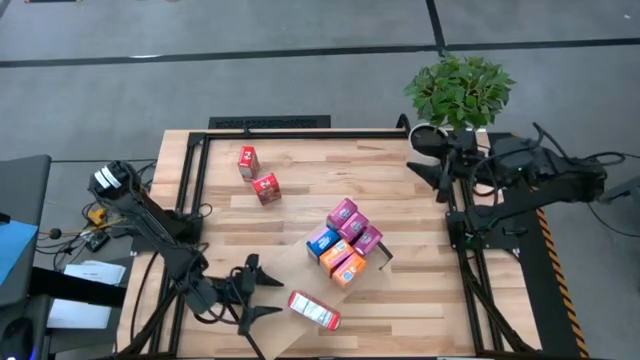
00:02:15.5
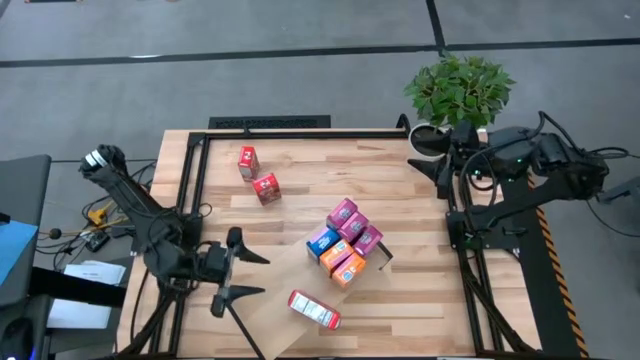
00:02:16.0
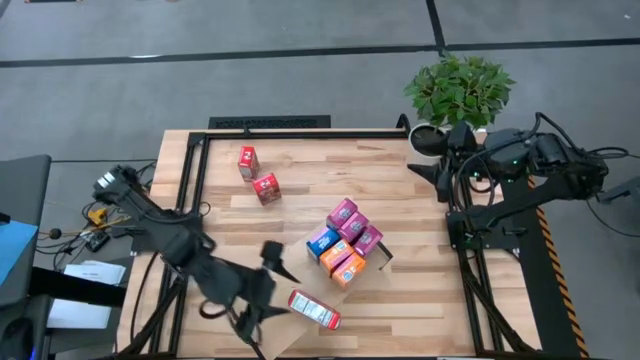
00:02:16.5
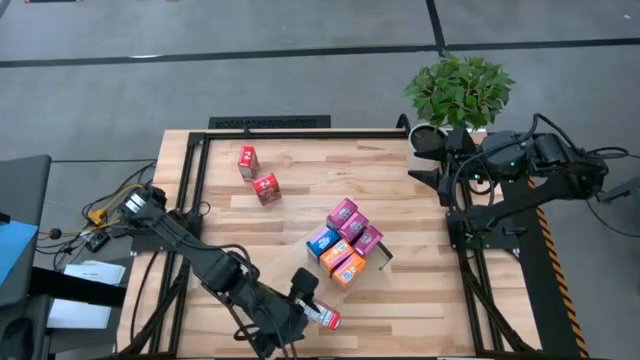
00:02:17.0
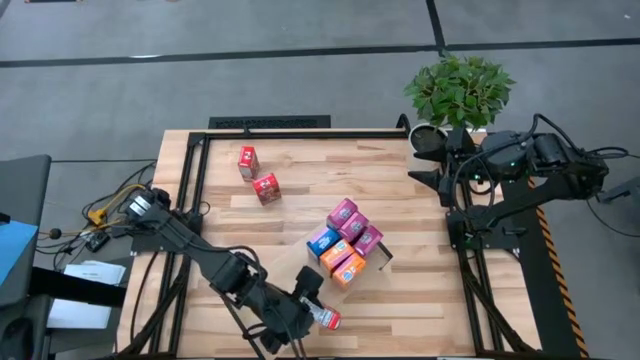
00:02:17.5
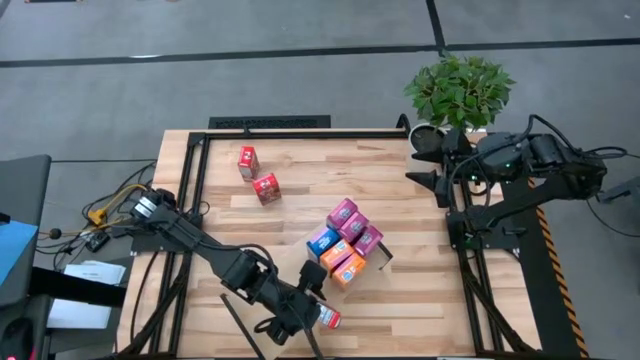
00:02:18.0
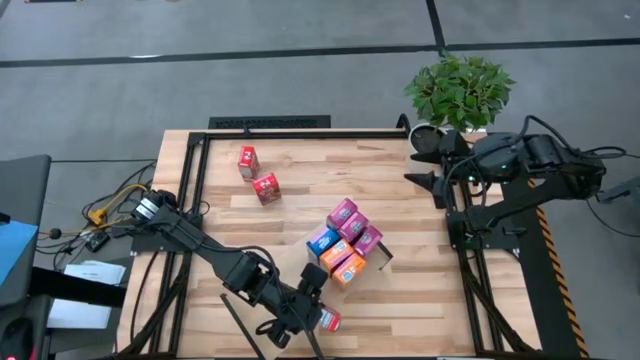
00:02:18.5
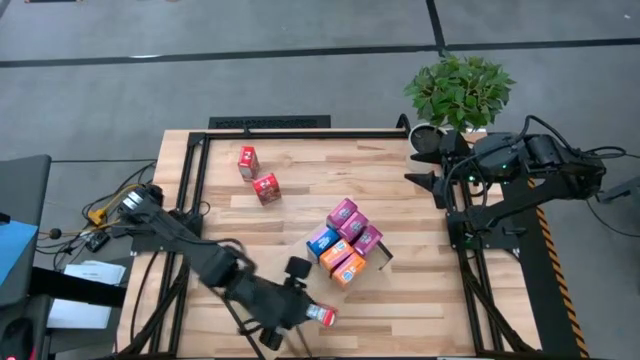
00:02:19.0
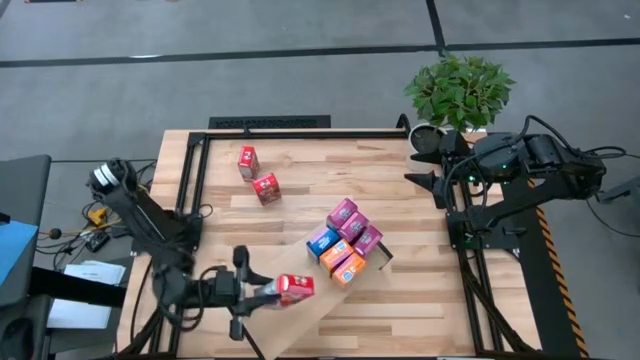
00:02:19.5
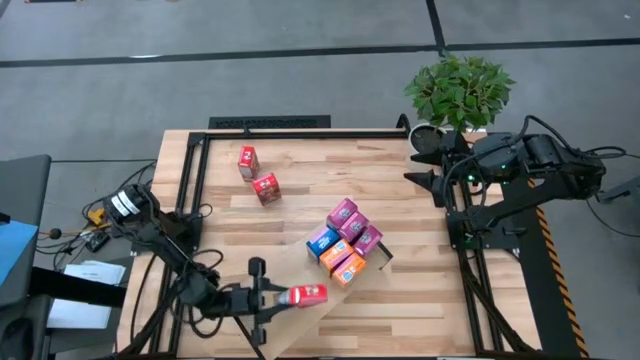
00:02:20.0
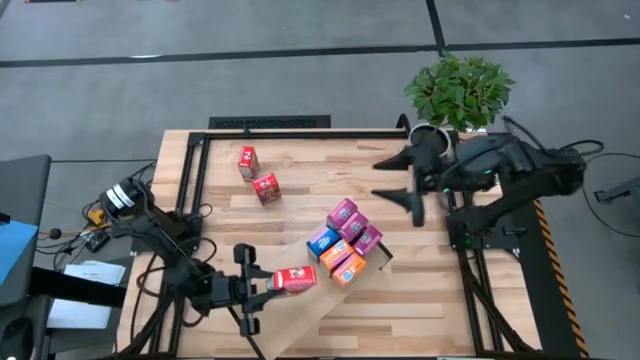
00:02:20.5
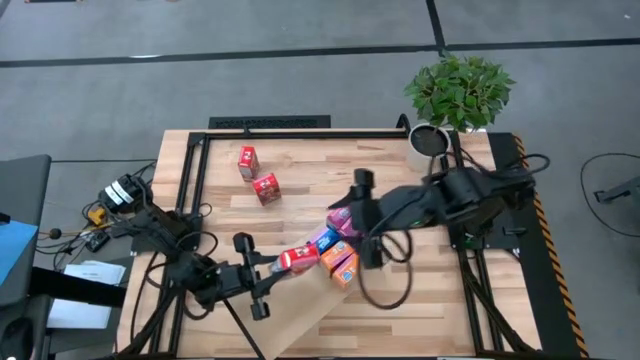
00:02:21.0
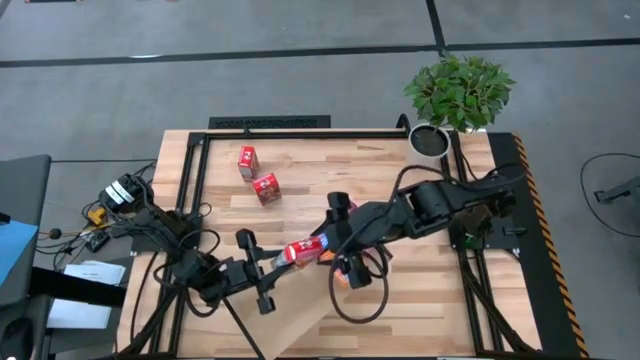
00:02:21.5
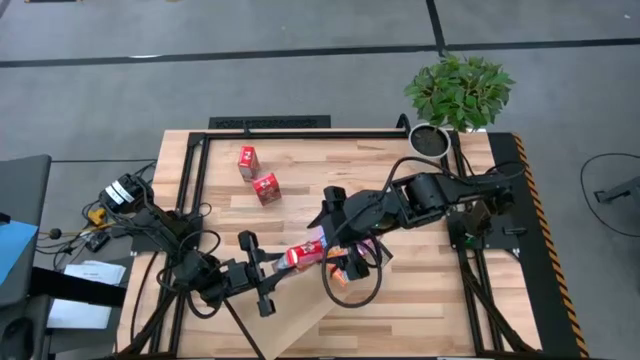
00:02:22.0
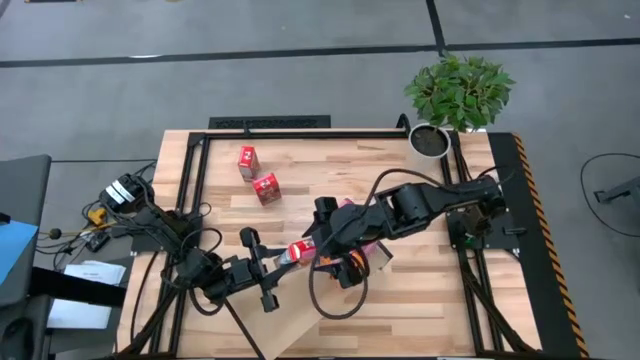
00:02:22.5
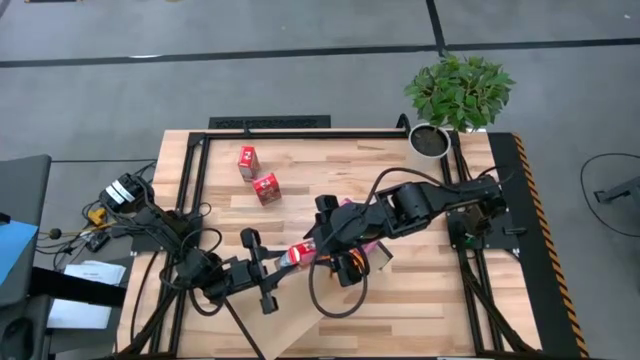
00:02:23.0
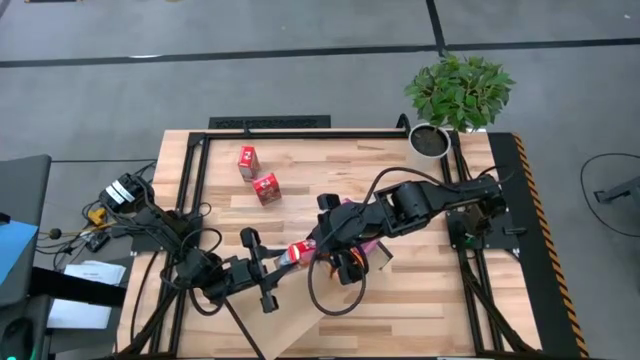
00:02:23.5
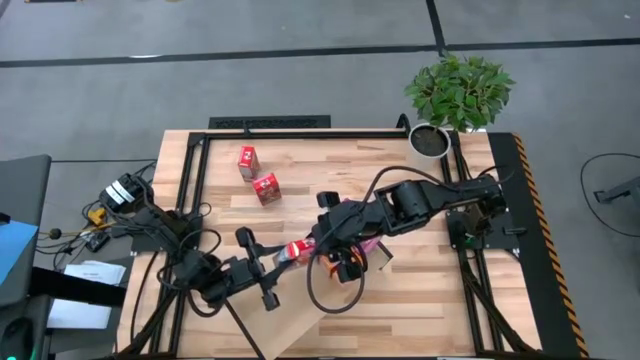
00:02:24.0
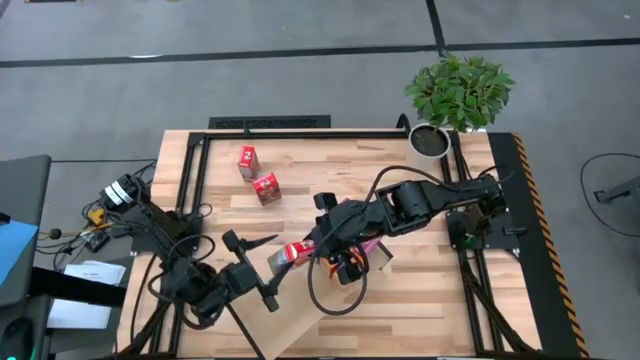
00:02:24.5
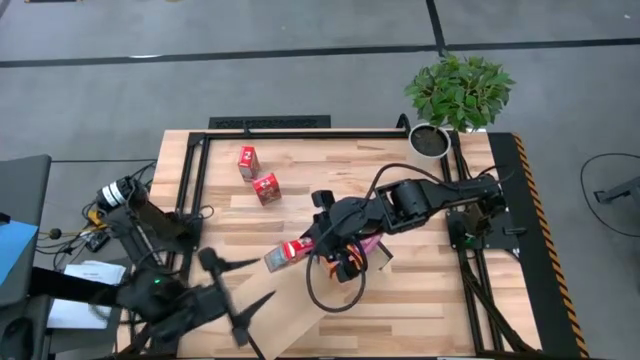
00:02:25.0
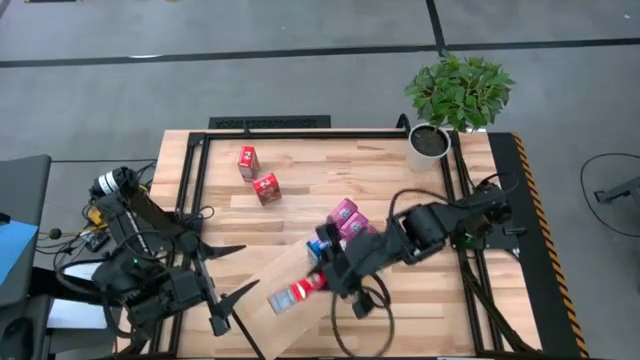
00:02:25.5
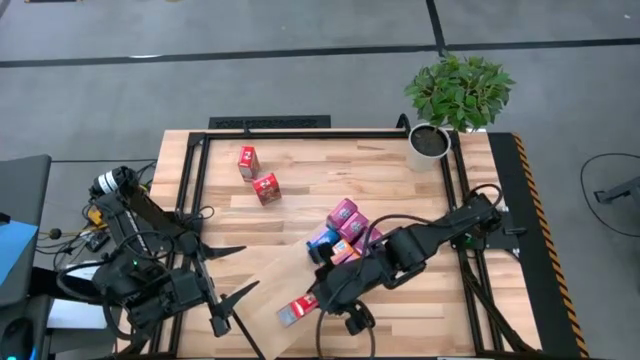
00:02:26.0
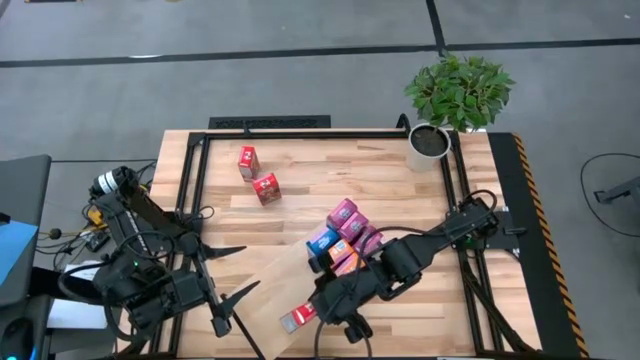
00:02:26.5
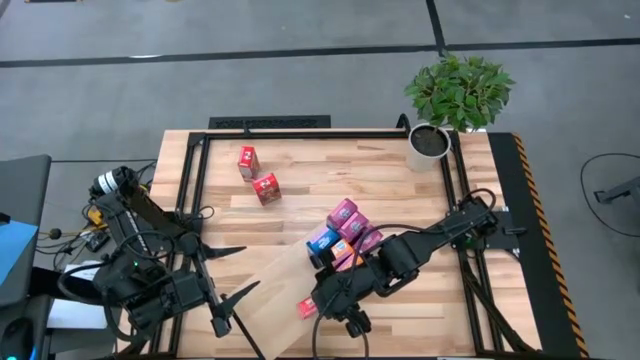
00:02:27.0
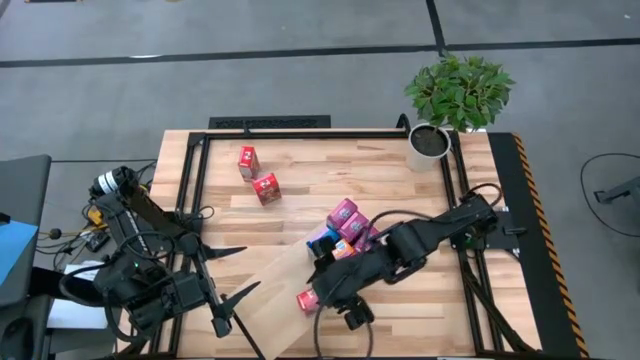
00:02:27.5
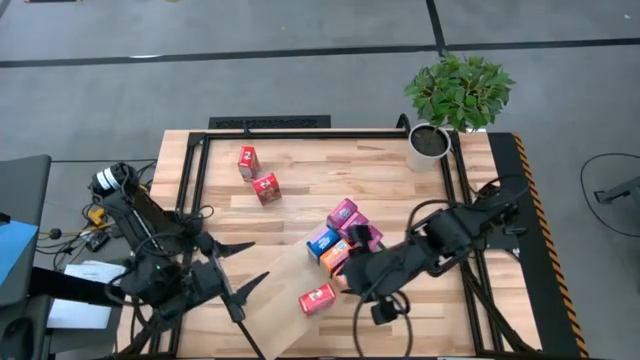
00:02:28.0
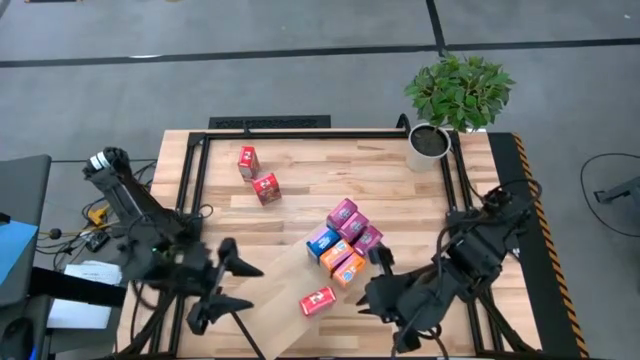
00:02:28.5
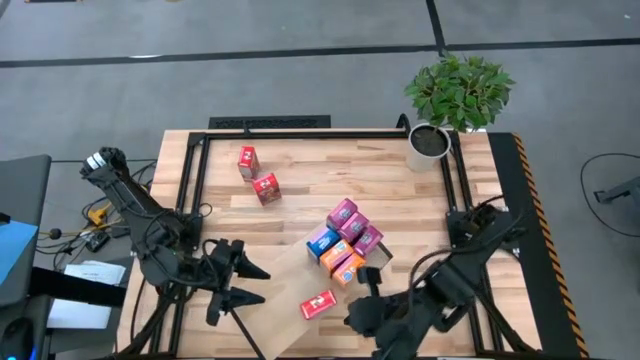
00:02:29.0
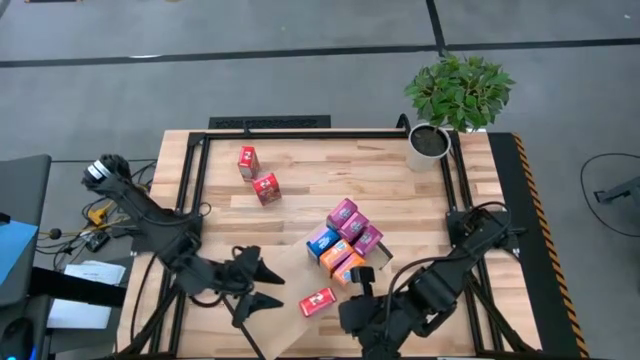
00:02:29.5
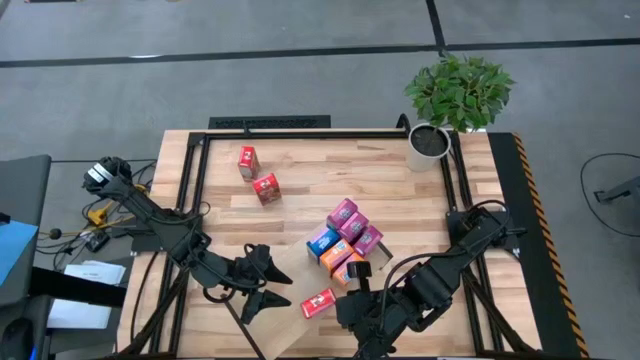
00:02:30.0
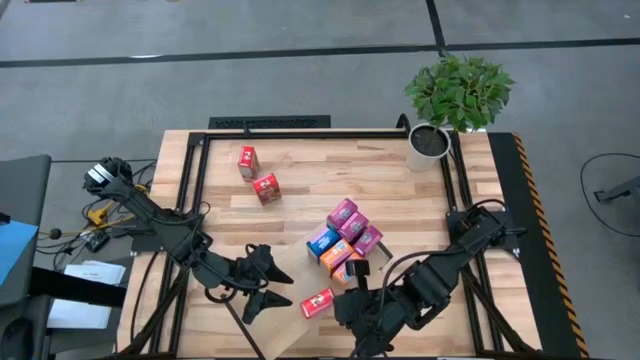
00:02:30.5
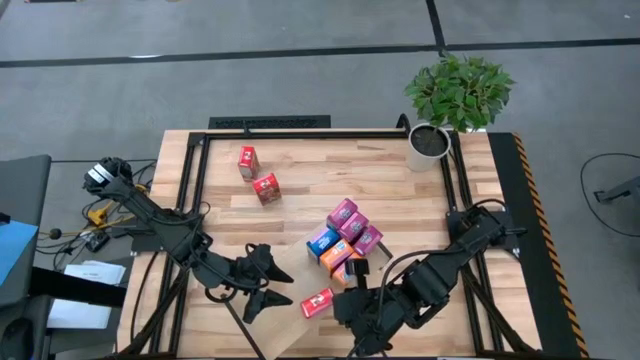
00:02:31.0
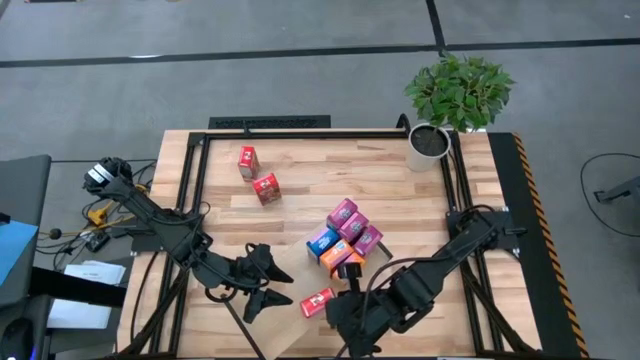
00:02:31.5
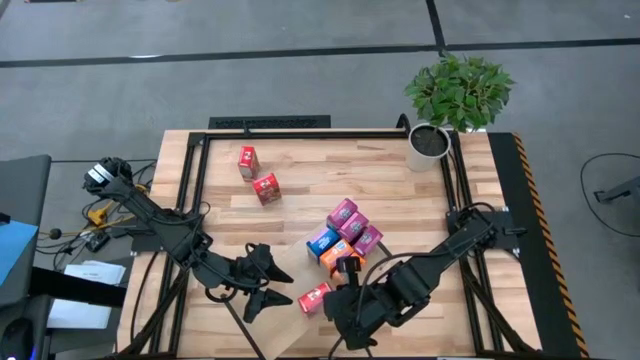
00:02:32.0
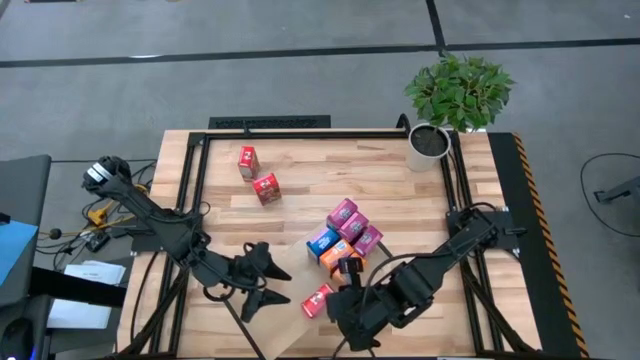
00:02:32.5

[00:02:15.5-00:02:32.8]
Task: Stack cereal on shelf
Put the bottom red cereal box onto the shelf
